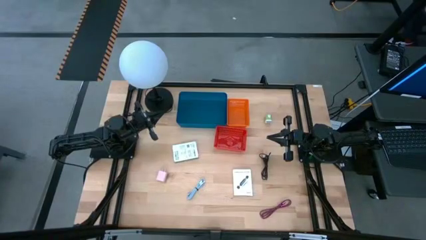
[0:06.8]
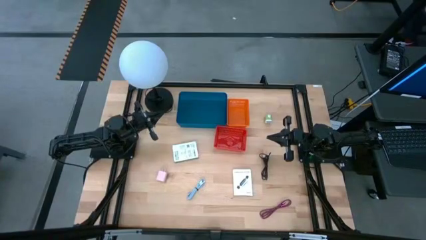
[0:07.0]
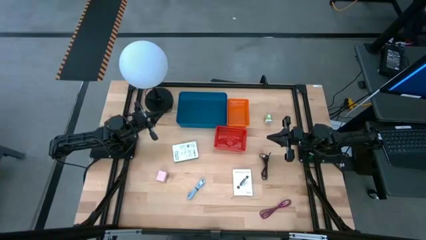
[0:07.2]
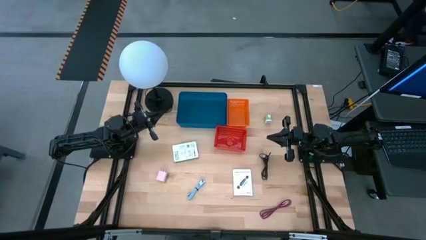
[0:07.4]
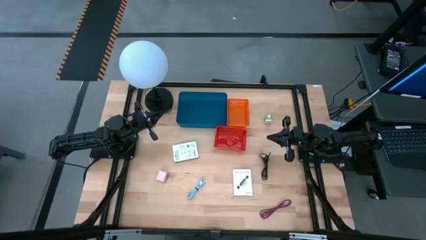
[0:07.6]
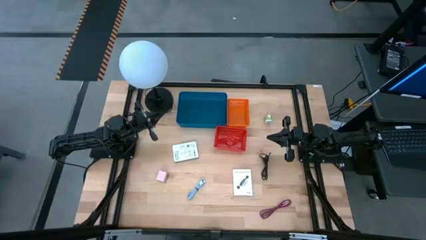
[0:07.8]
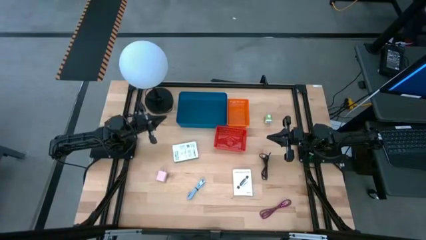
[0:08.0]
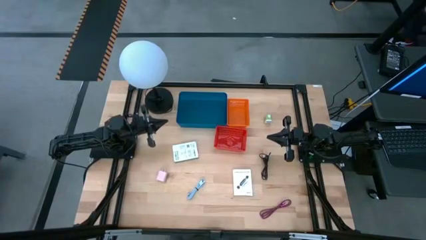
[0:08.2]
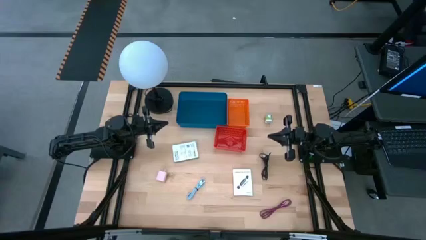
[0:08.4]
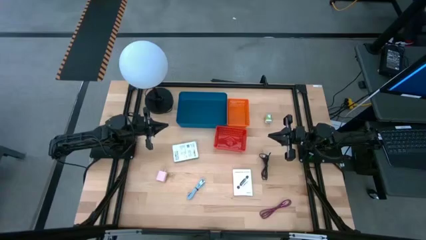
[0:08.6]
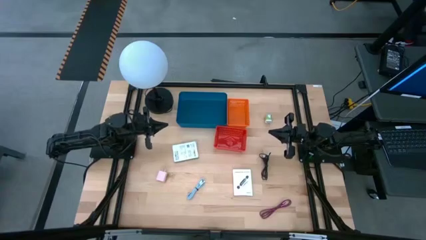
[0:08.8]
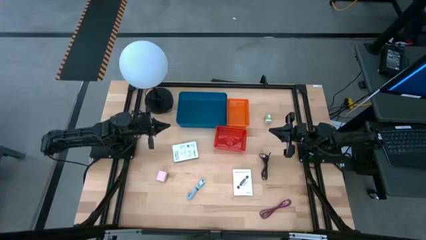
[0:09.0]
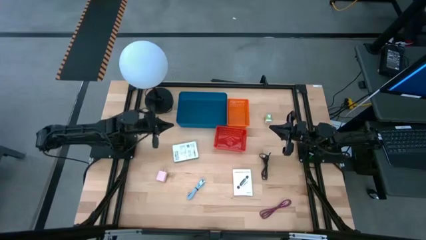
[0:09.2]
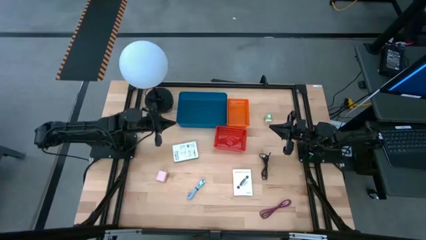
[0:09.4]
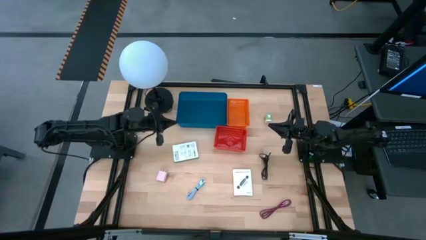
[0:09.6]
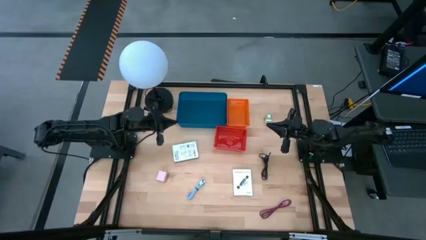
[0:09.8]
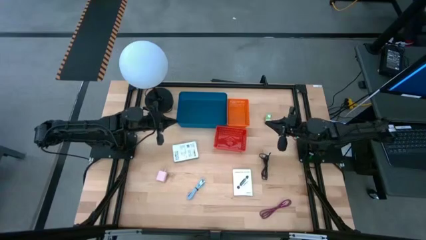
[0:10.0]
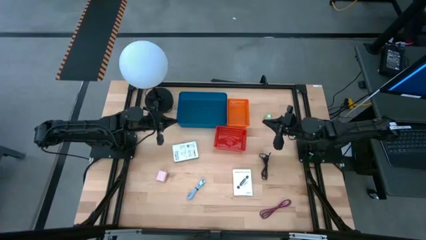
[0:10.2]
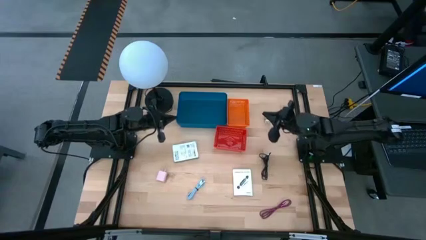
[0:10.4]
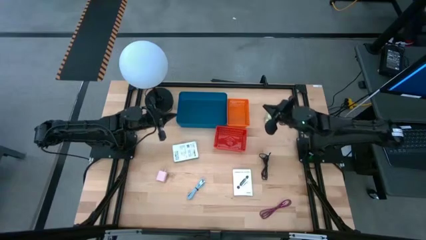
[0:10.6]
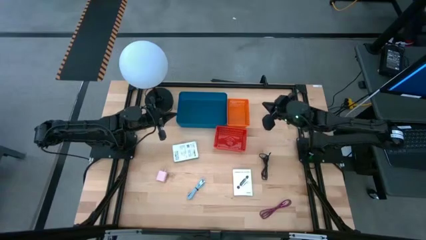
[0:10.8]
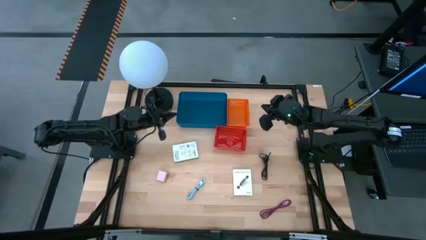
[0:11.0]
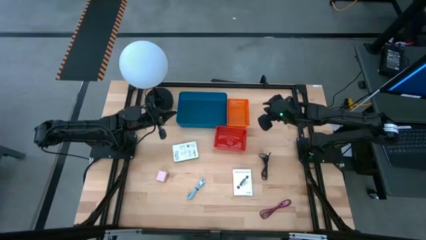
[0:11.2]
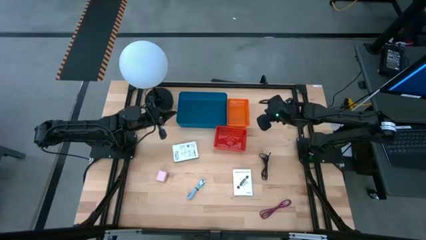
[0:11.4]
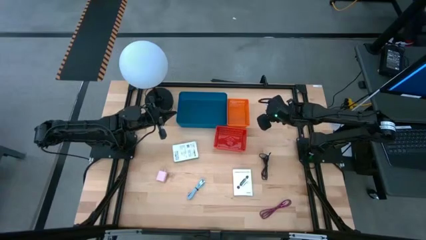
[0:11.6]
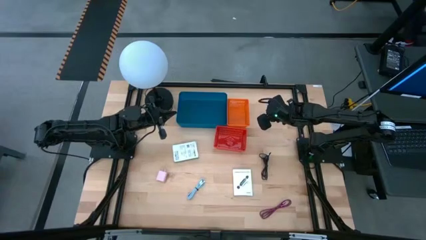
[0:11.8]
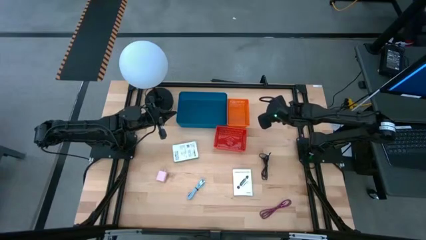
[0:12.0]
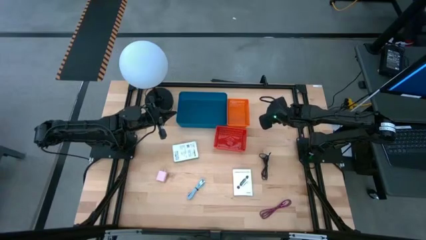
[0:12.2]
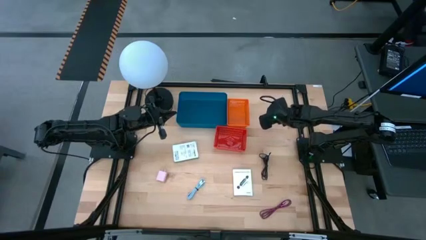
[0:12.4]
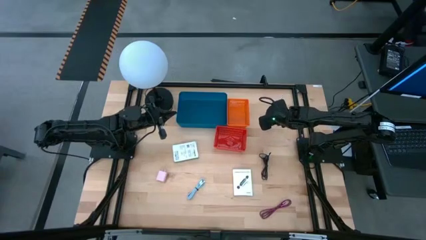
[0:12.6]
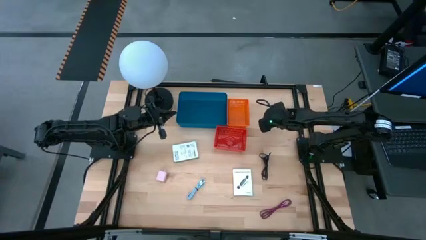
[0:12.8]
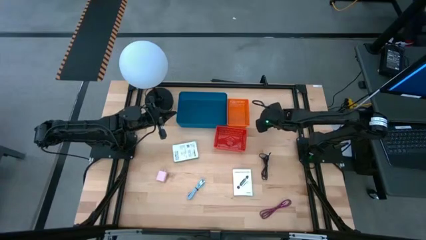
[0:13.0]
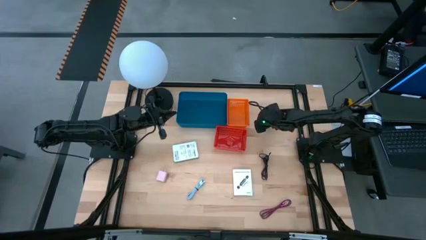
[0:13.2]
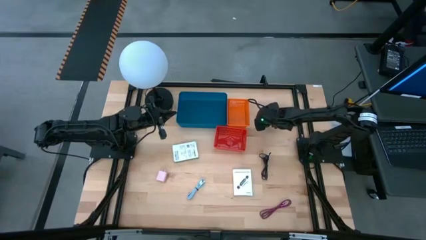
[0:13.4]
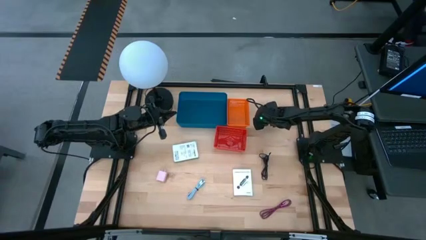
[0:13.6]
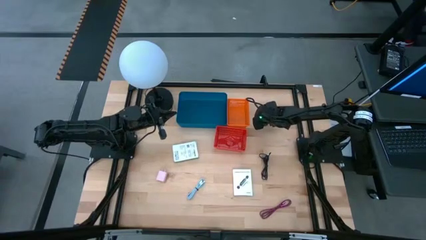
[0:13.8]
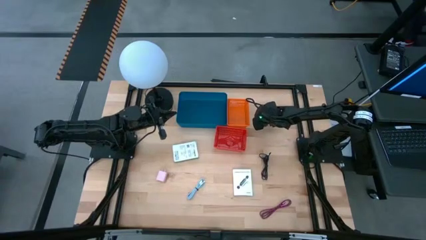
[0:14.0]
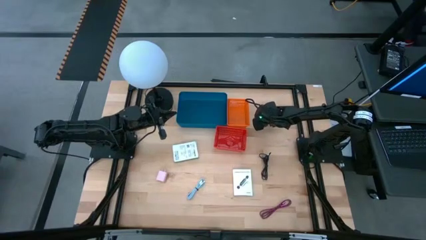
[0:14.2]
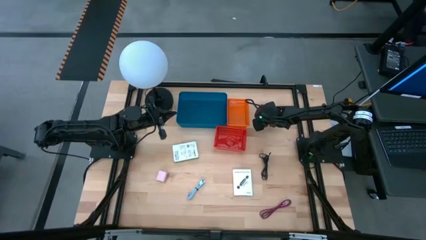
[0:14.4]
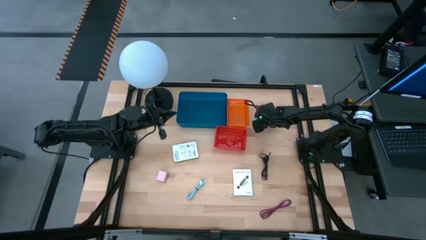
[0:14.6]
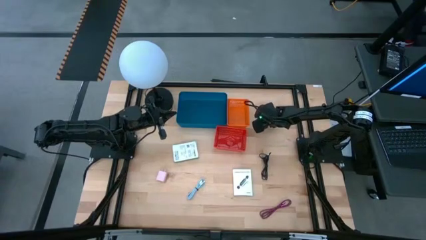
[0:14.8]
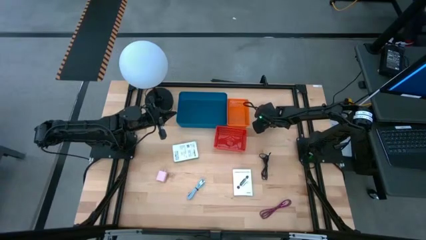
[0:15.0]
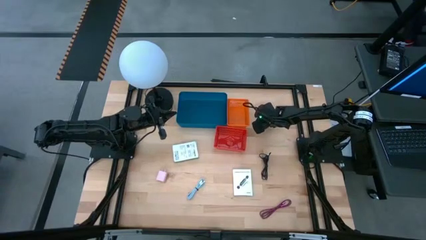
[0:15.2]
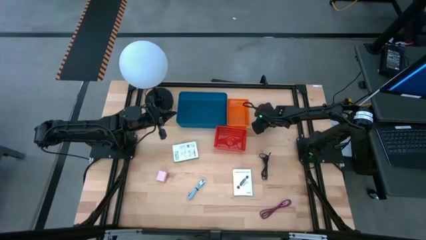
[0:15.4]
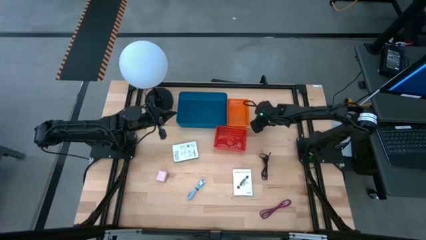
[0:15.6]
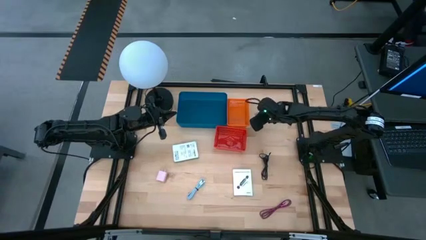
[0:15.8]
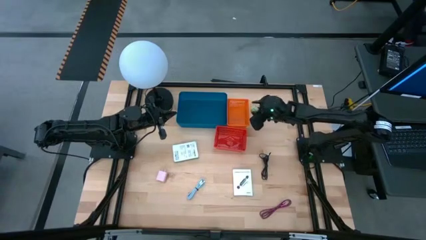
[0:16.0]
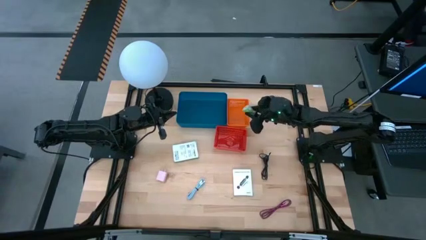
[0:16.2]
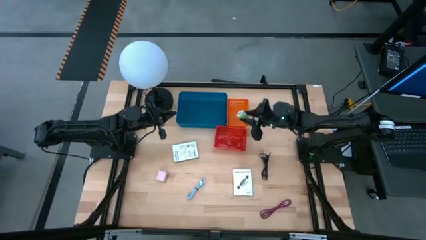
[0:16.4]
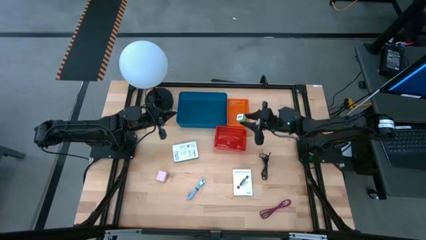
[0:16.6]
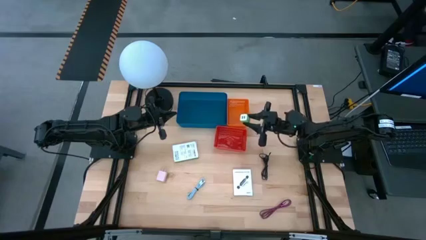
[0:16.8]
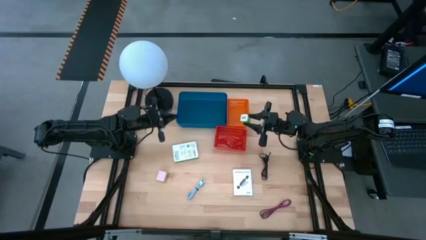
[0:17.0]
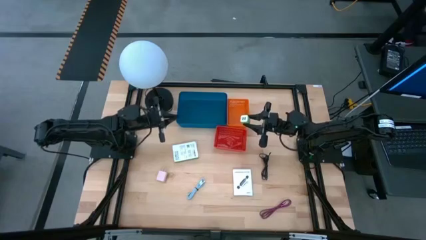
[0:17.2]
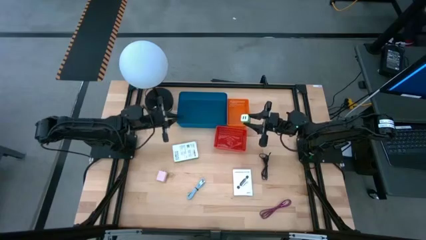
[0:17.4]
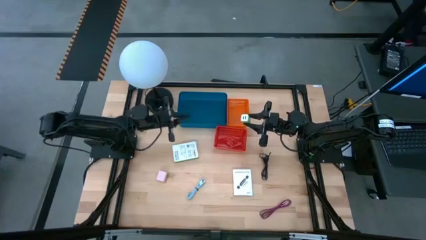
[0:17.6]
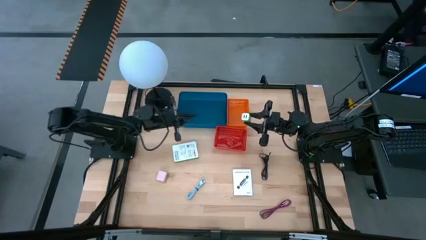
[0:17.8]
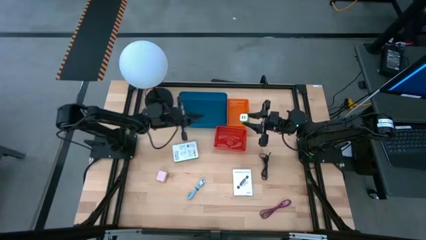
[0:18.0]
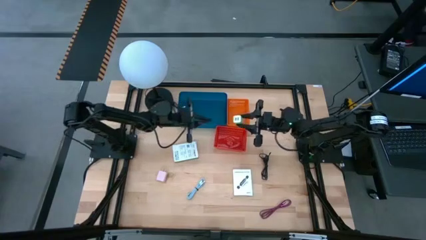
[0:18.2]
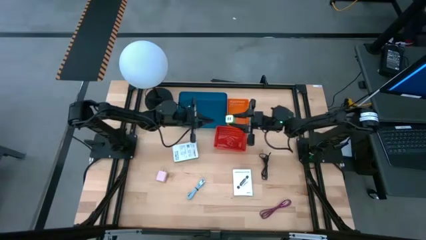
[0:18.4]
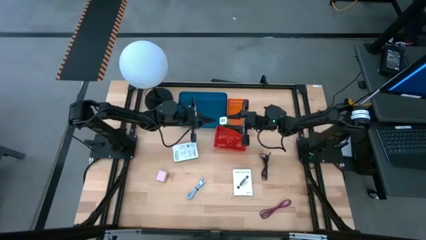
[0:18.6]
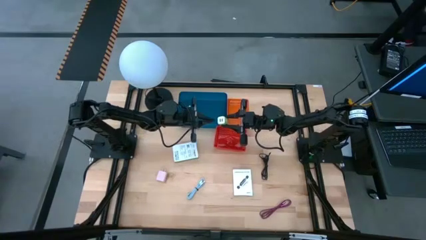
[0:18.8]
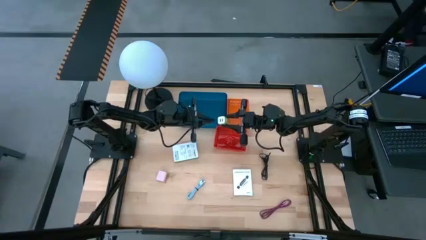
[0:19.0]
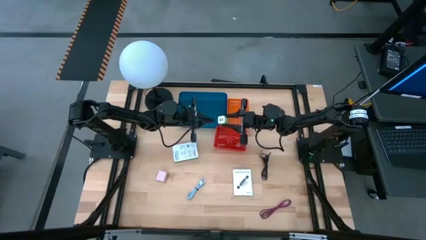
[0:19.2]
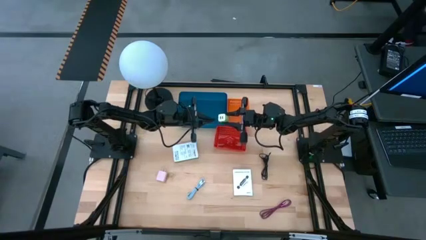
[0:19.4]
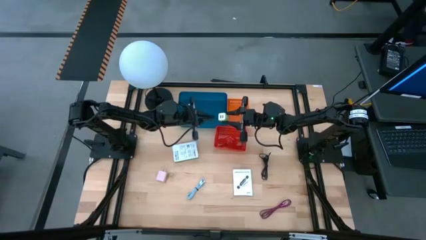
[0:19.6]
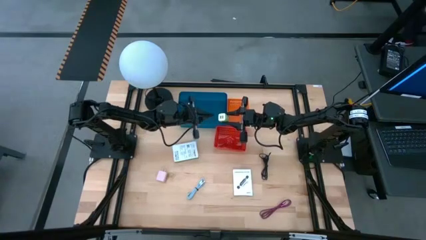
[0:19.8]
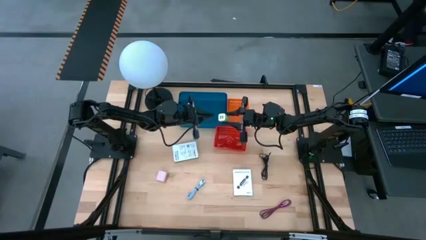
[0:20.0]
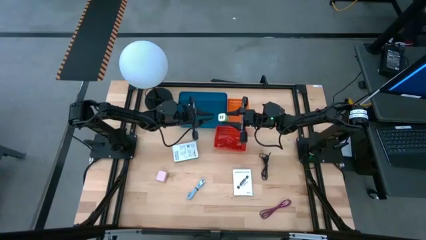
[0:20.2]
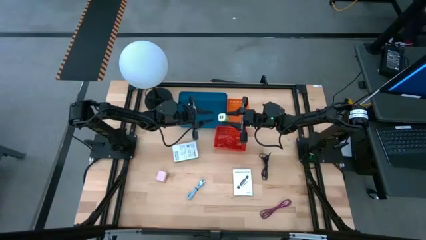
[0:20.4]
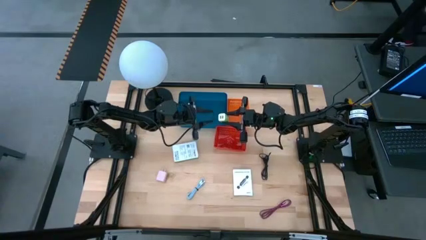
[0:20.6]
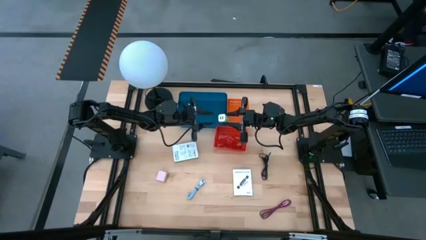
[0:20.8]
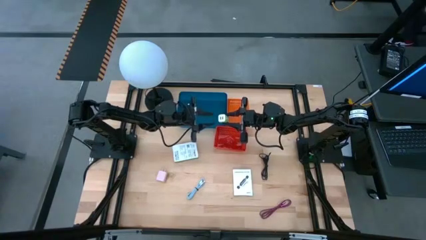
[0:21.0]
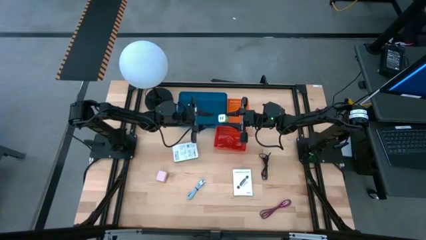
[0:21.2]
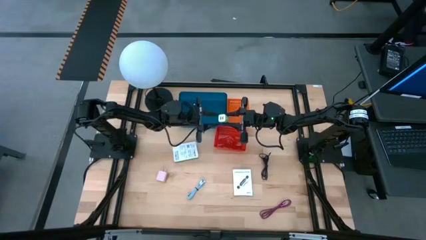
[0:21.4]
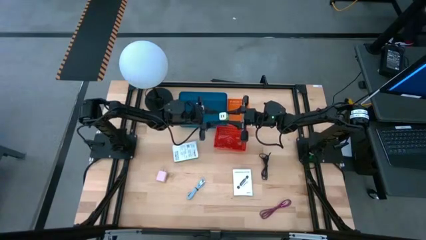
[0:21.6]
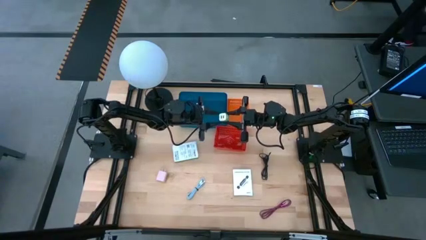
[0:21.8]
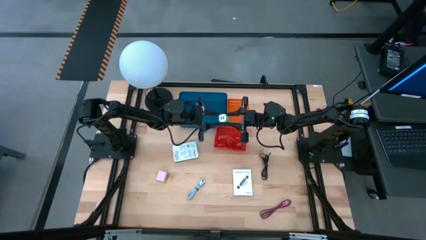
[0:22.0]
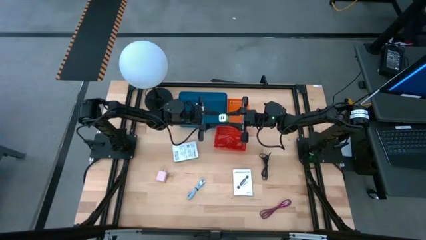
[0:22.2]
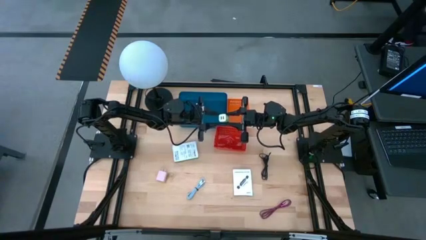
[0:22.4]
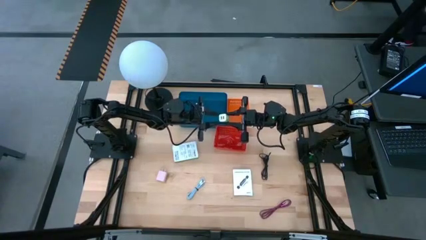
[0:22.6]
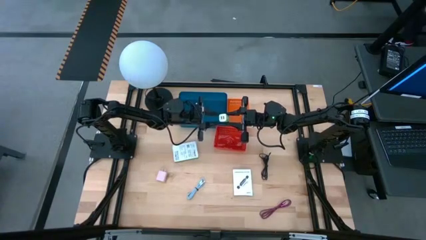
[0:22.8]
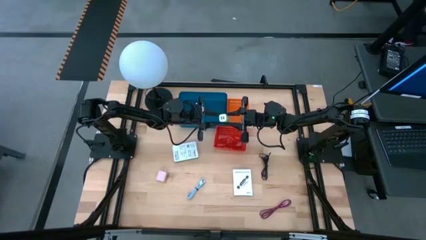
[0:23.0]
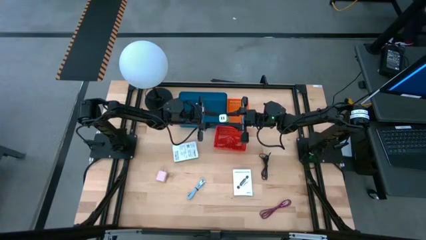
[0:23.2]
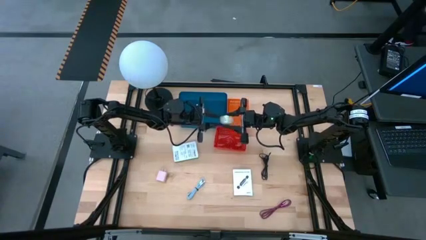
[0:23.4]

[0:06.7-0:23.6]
Task: Pick and place items into bin
Put the green charger adapter into the red bin
